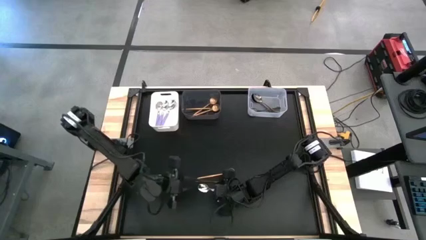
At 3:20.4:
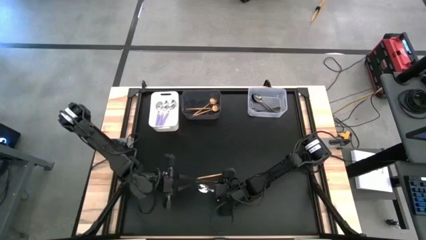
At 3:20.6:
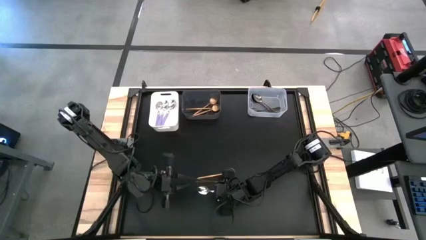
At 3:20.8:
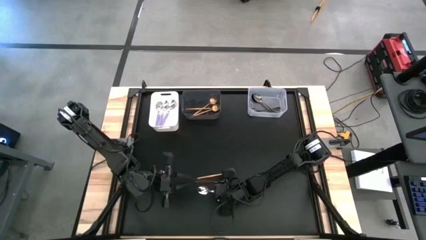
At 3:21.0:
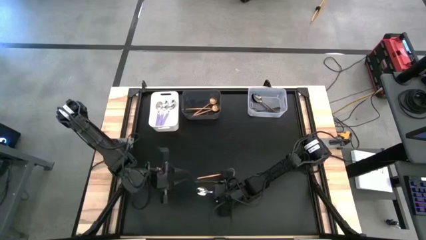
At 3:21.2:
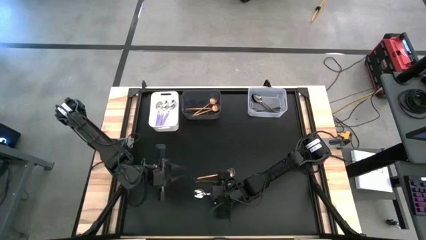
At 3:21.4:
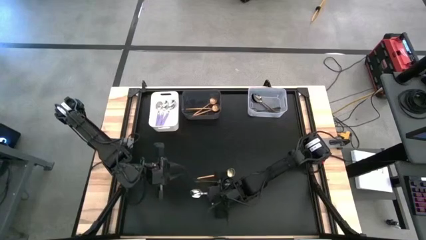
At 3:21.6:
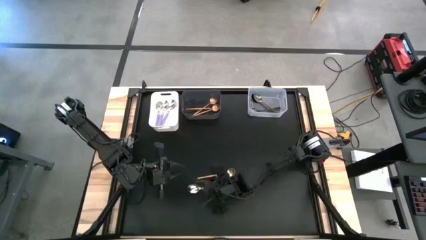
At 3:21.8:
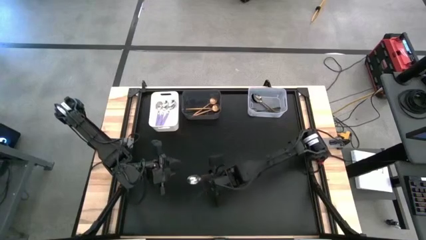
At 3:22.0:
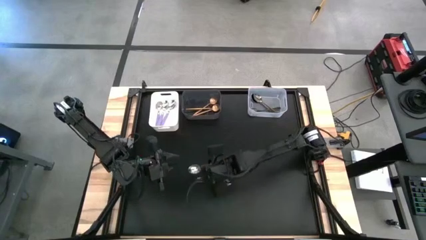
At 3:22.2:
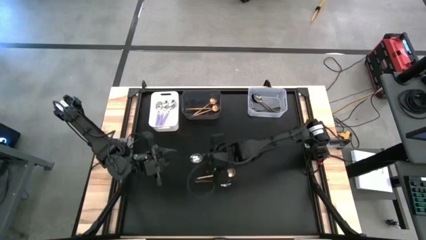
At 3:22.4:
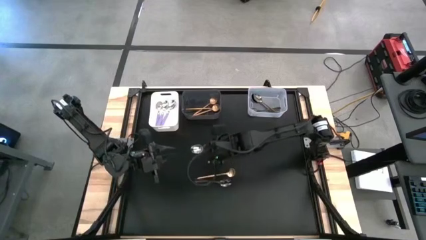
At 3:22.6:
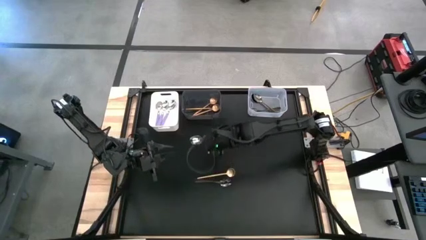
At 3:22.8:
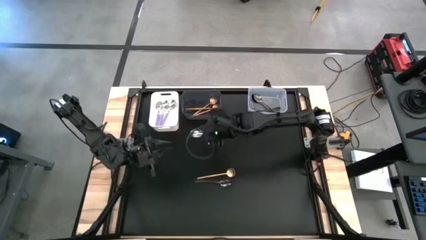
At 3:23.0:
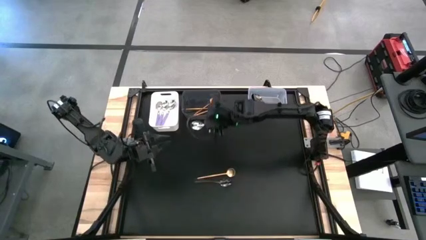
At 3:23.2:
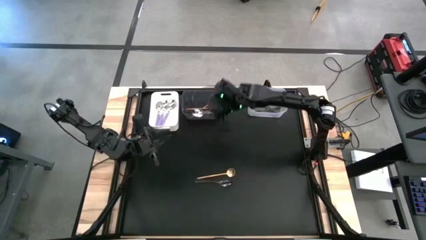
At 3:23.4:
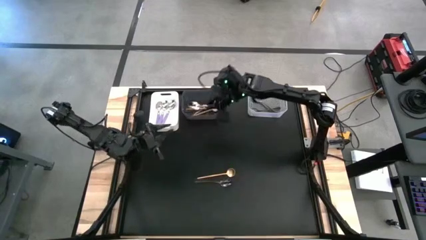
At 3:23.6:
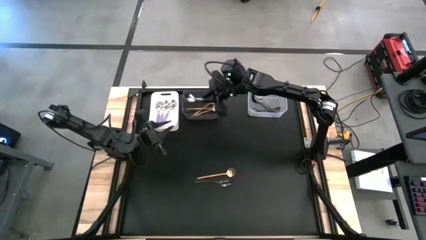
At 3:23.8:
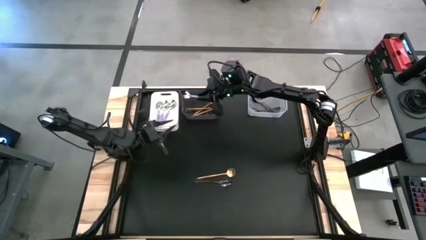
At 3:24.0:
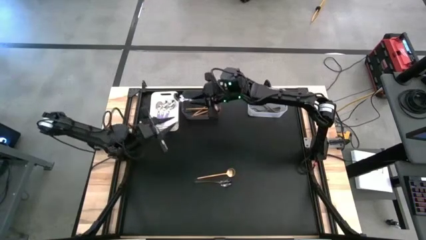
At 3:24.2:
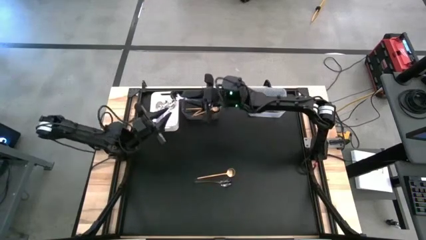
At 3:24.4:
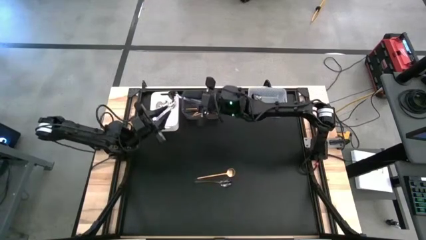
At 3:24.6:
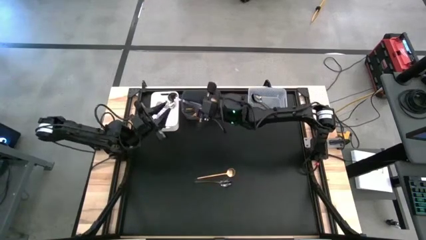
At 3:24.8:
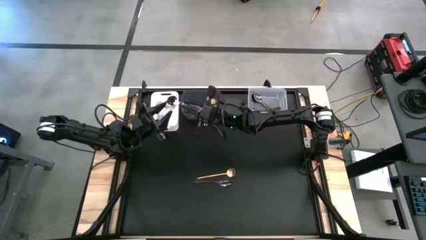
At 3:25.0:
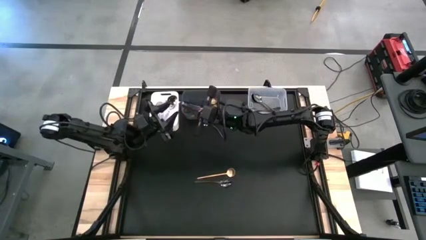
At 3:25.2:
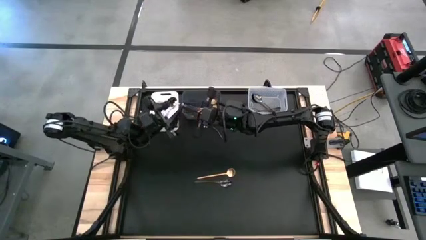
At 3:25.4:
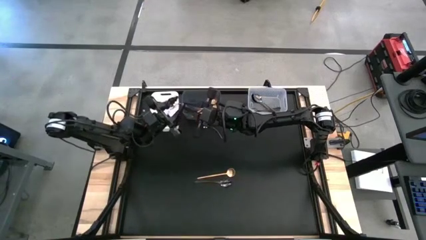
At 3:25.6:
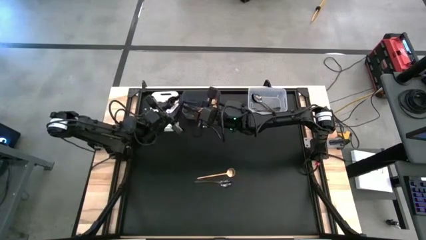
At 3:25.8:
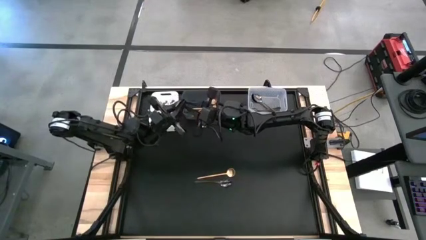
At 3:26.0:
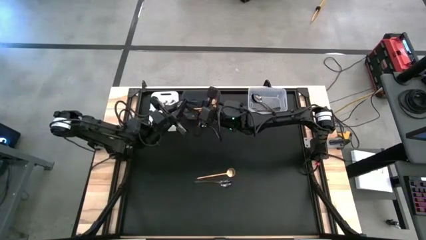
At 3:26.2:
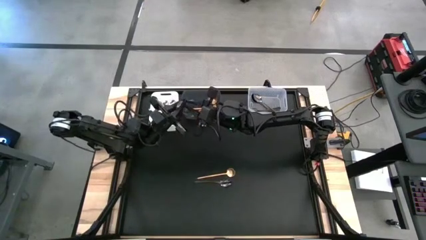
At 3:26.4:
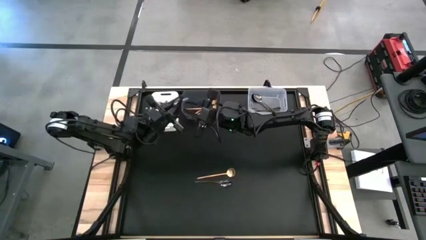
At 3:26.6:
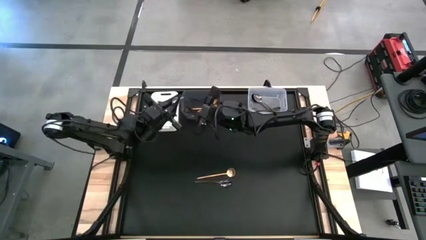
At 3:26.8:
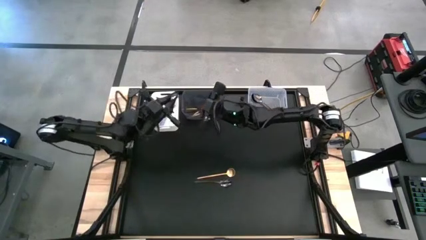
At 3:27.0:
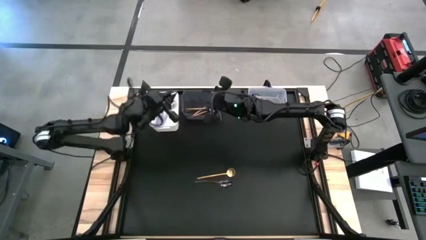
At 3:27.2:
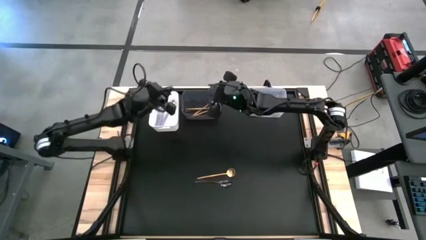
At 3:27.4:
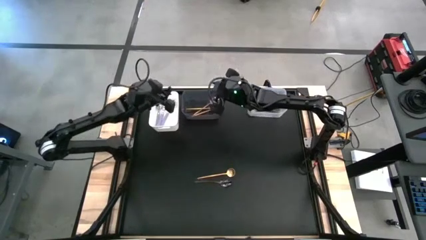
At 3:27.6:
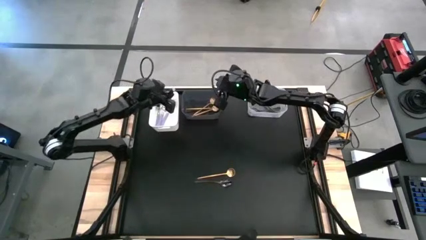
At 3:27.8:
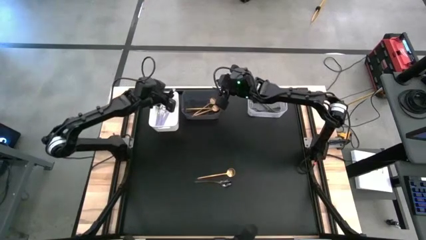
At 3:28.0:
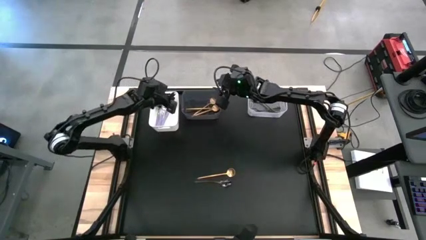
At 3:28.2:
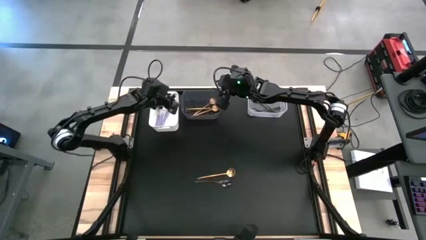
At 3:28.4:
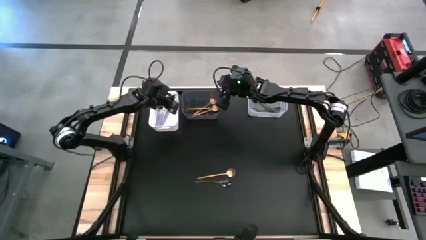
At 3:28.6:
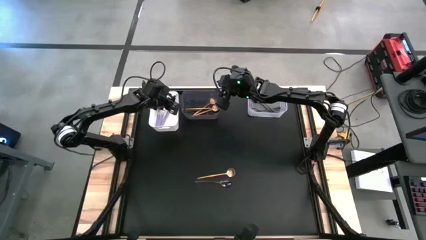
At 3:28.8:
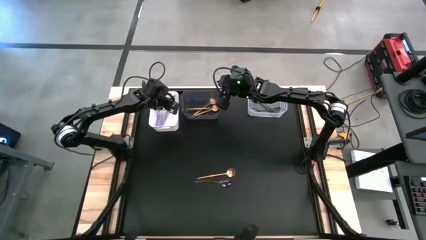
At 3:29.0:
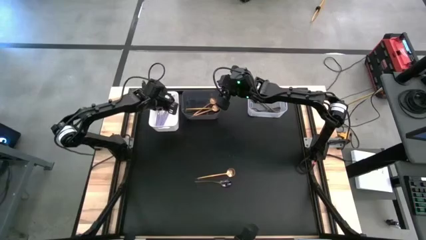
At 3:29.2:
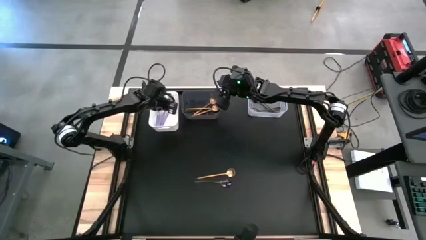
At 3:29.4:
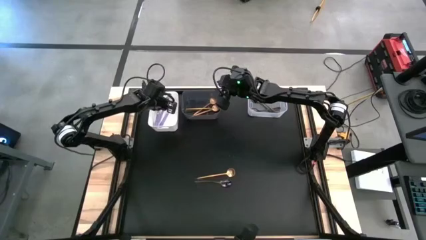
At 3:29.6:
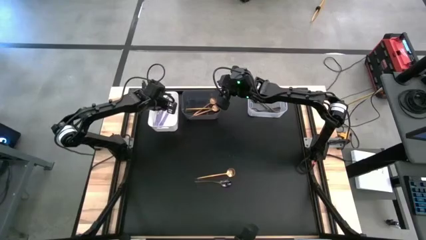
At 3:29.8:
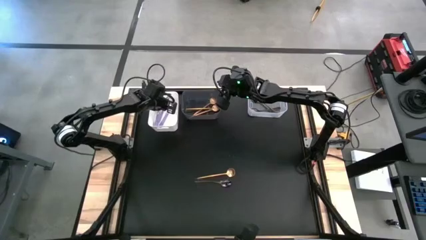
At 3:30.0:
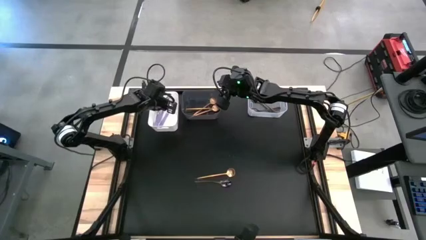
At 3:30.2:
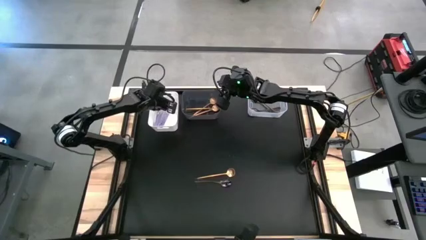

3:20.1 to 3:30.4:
Task: Sort silverware by color (type)
Put the purple spoon into the white bin
